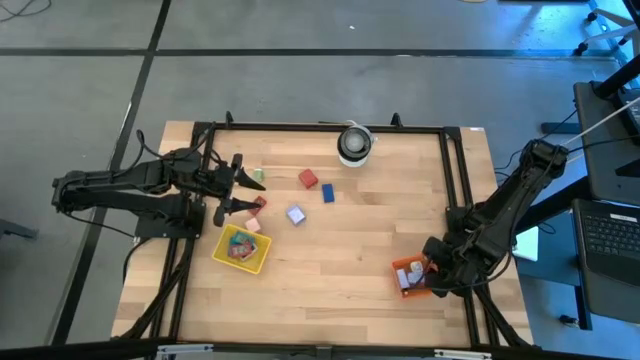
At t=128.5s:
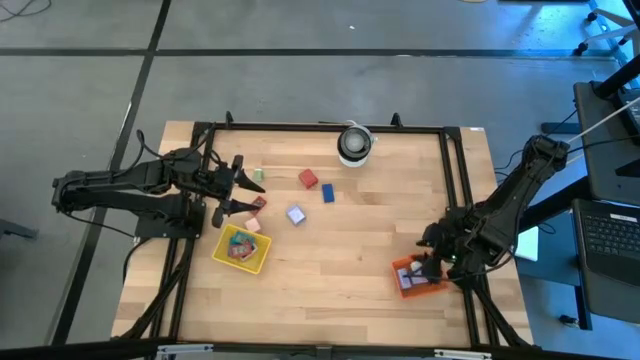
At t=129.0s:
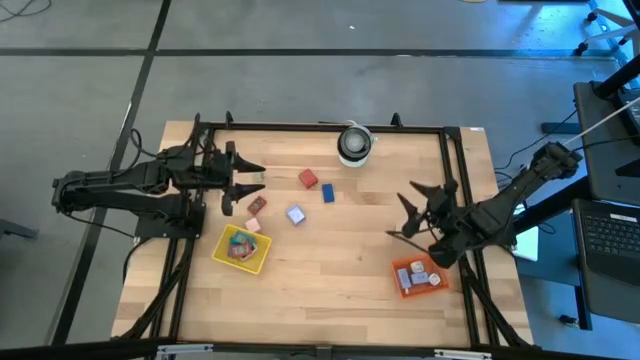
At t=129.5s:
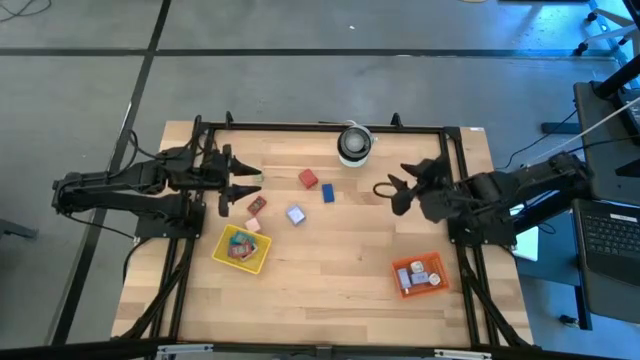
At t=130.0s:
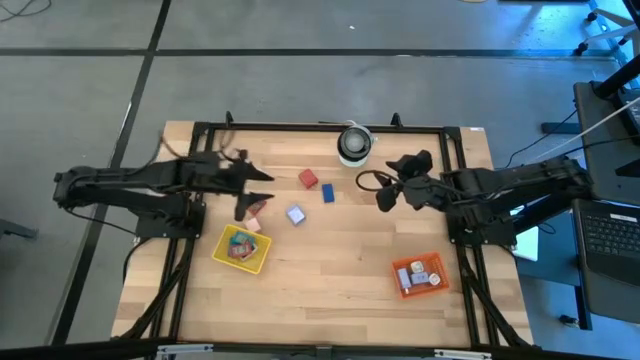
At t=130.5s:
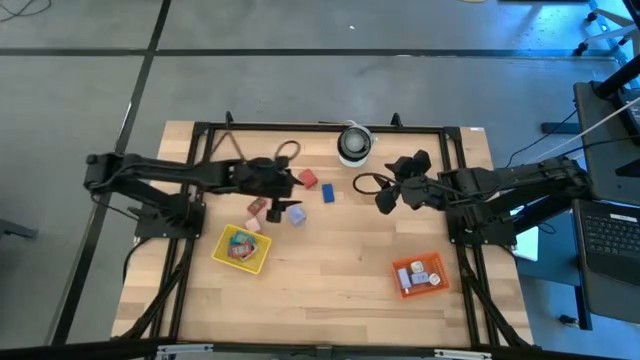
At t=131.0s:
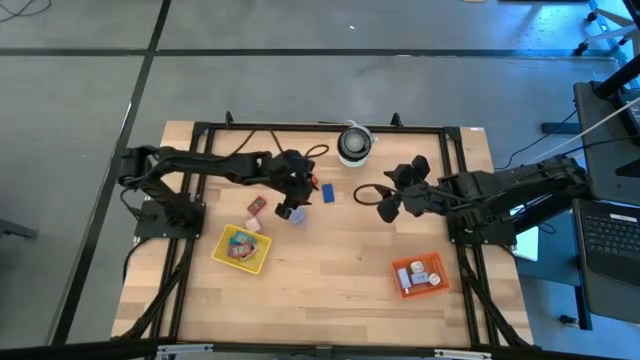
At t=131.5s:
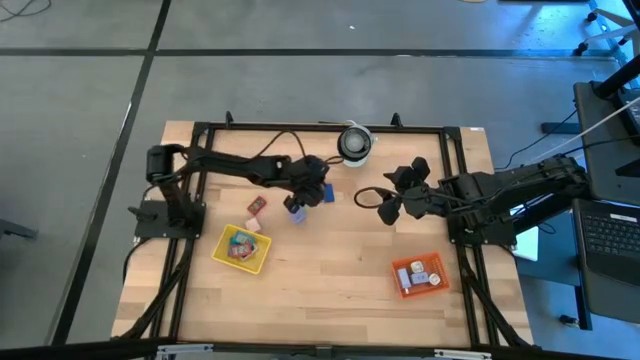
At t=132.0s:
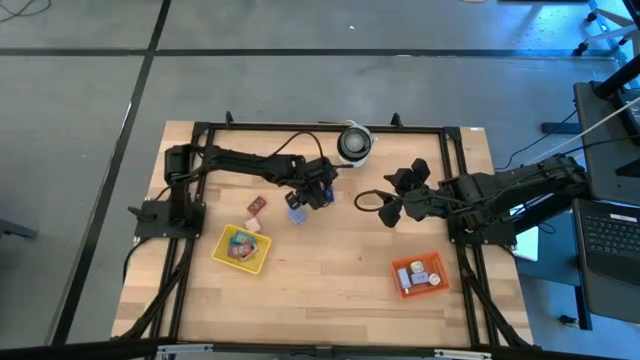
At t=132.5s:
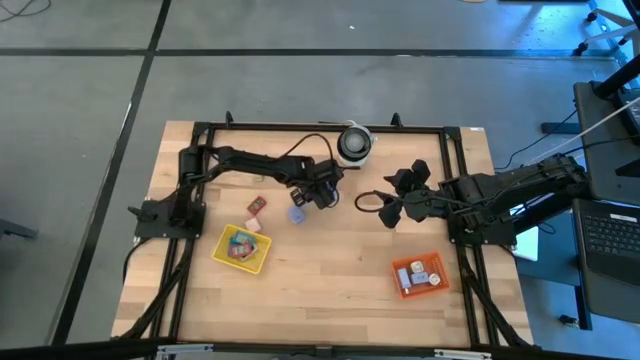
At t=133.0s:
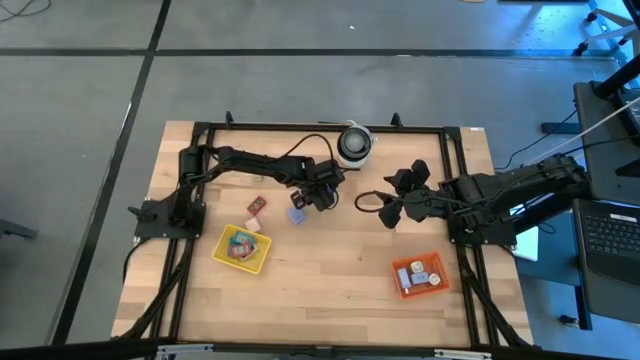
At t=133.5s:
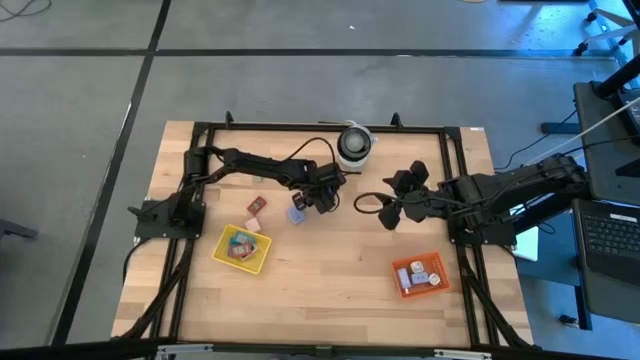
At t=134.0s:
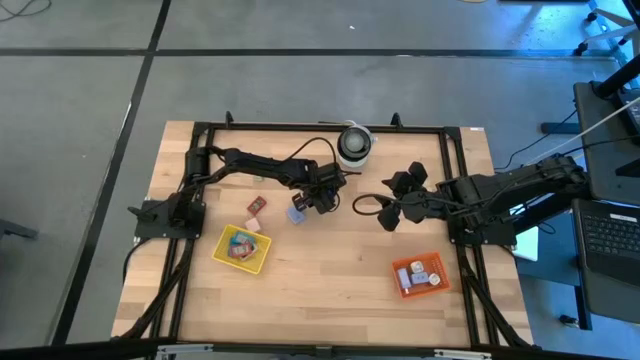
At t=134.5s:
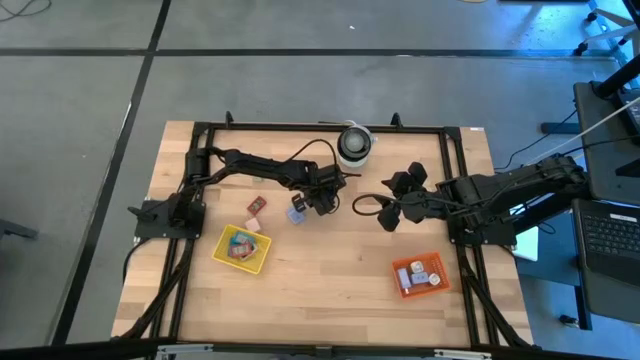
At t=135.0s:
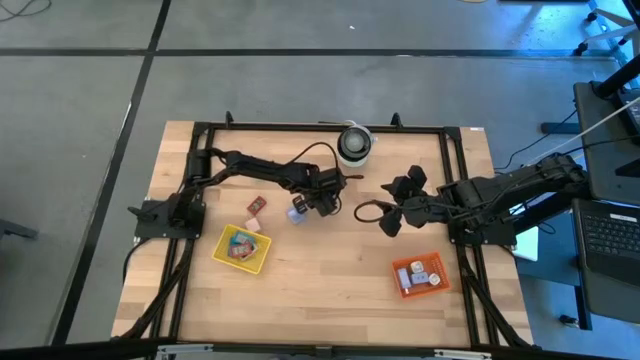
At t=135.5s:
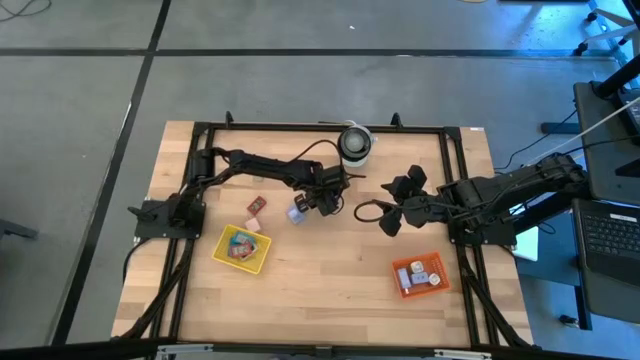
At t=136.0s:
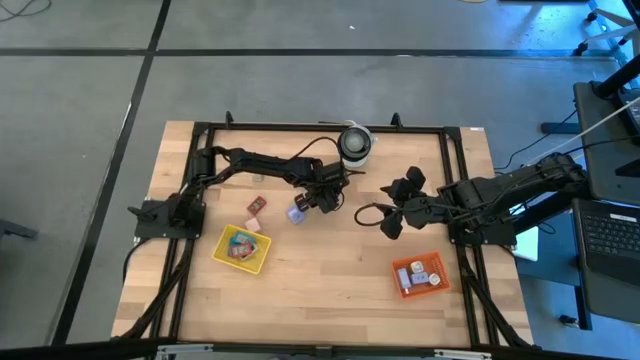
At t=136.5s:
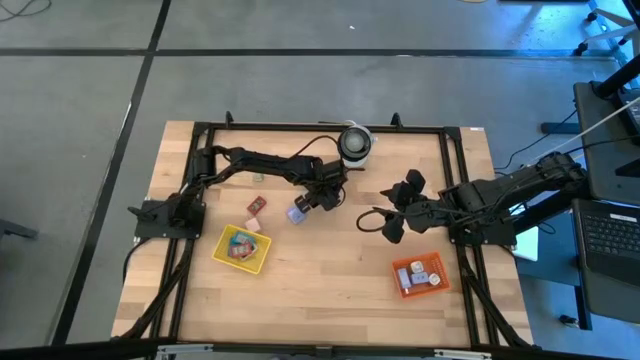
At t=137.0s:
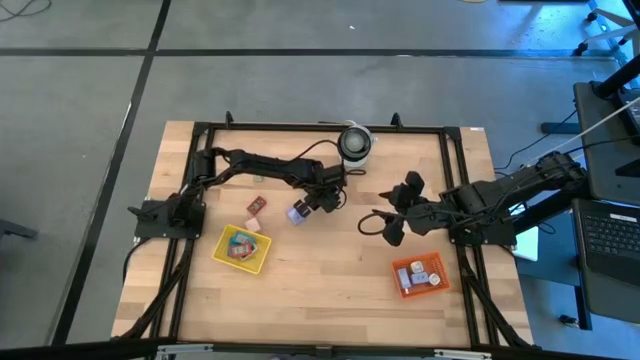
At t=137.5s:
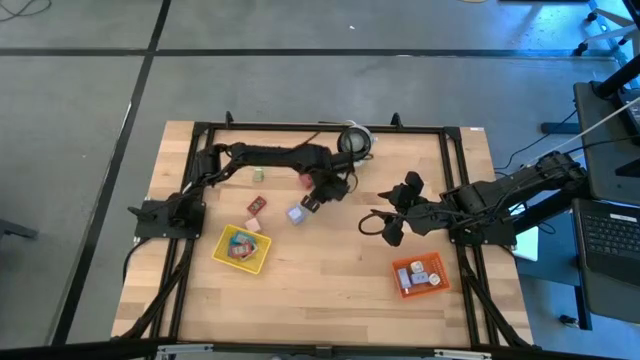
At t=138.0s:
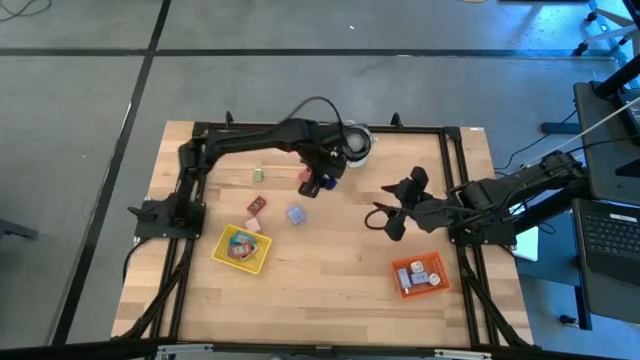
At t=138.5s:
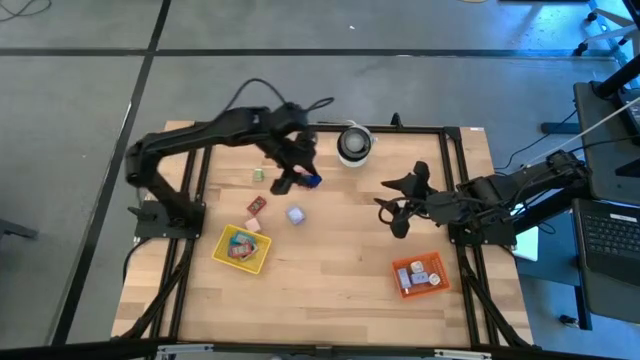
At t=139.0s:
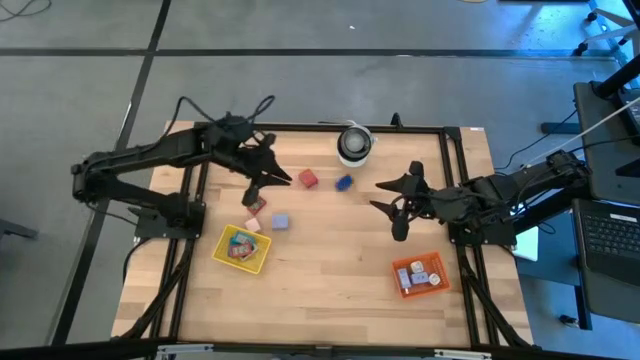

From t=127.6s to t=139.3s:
Task: Pick & Place Office items
Put the blue digital timer into the yellow bin

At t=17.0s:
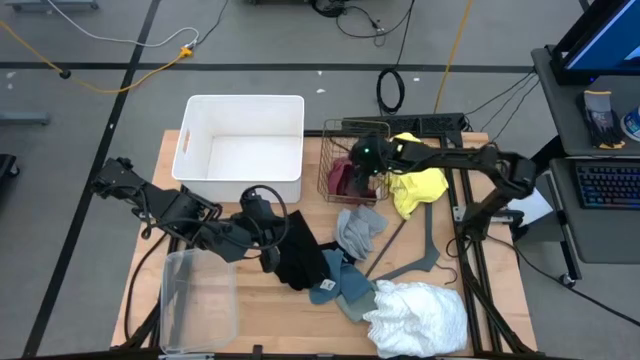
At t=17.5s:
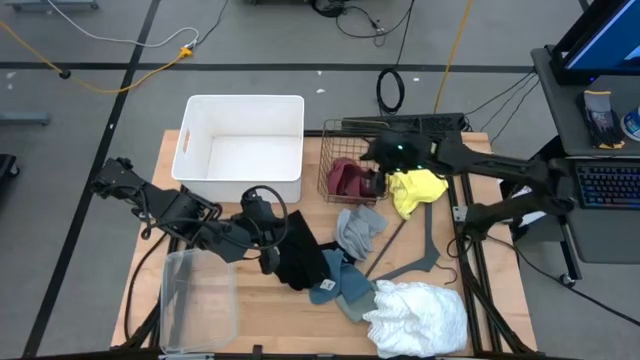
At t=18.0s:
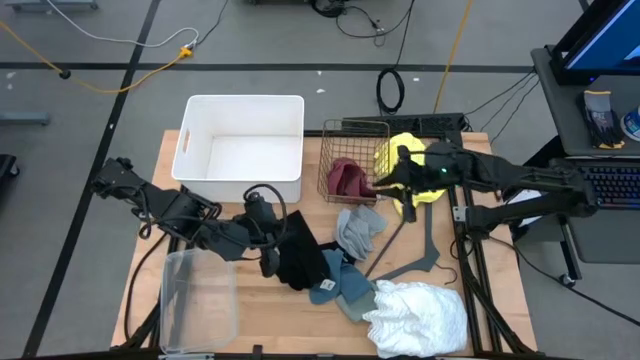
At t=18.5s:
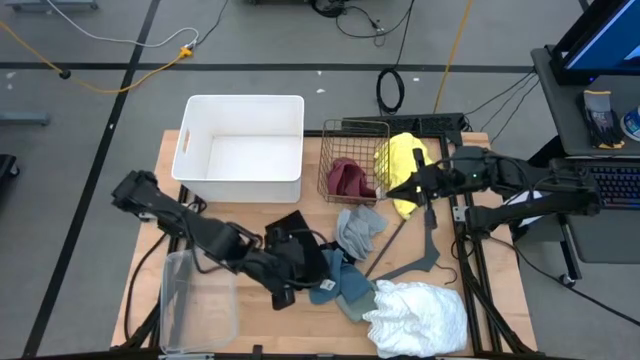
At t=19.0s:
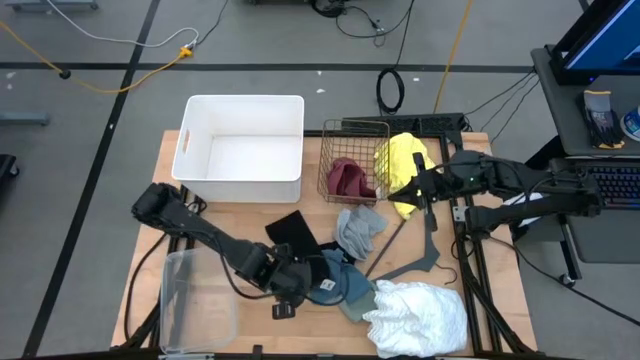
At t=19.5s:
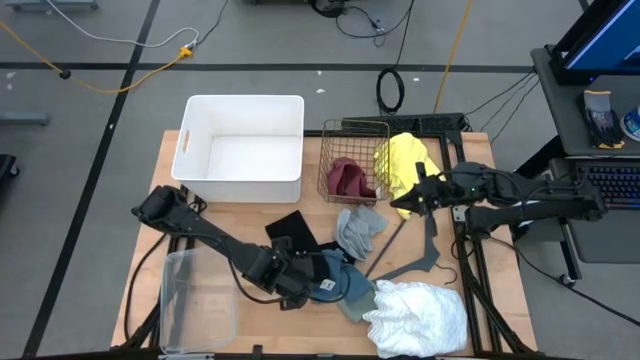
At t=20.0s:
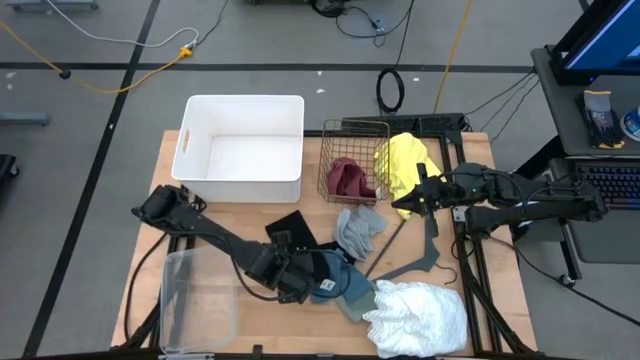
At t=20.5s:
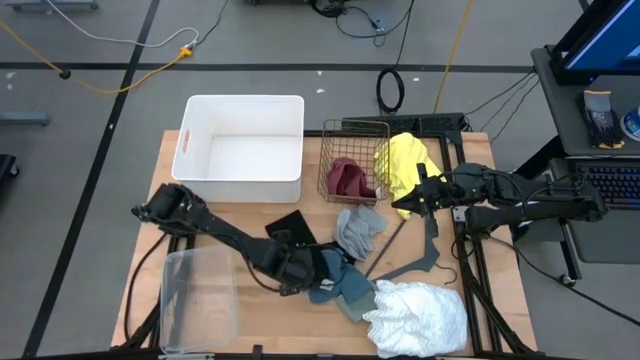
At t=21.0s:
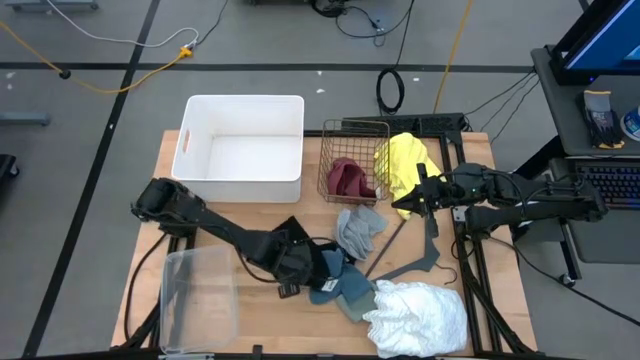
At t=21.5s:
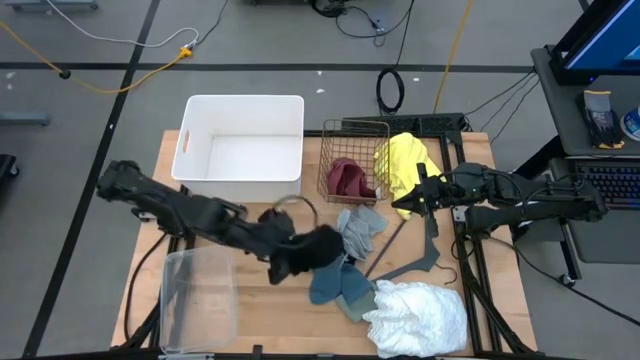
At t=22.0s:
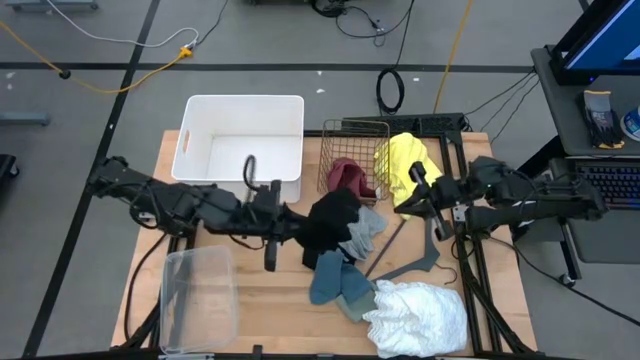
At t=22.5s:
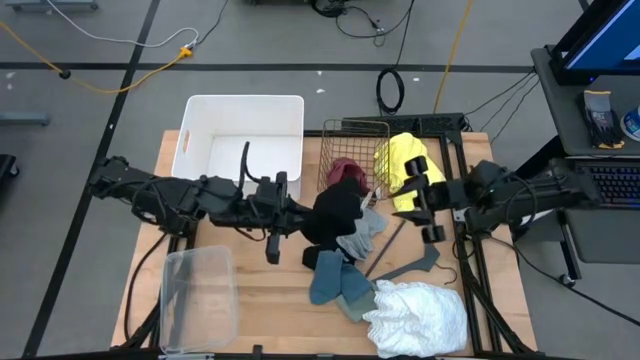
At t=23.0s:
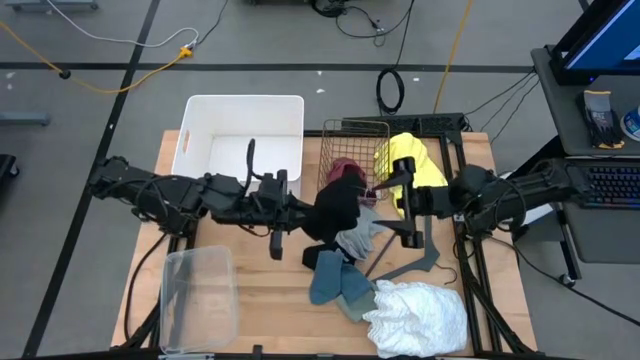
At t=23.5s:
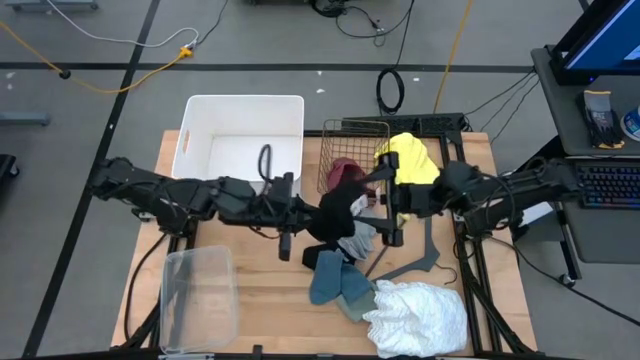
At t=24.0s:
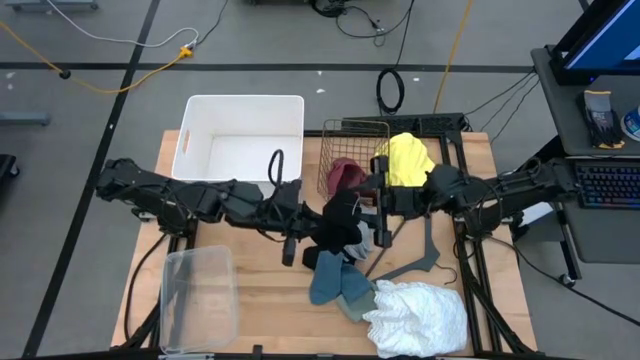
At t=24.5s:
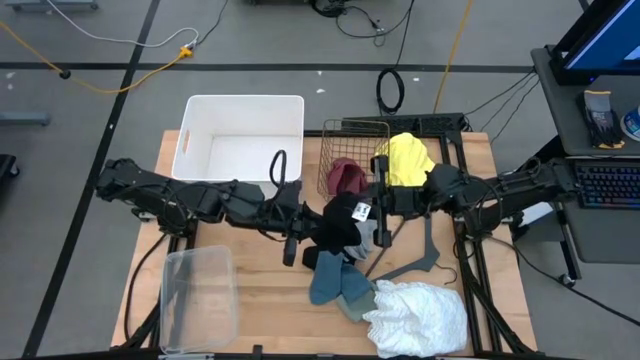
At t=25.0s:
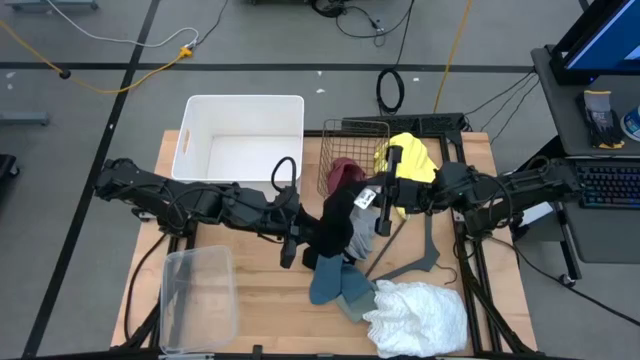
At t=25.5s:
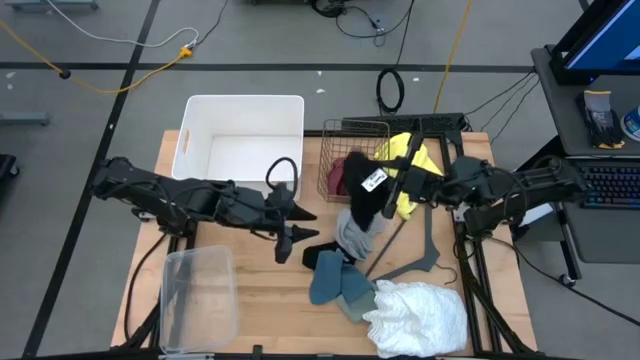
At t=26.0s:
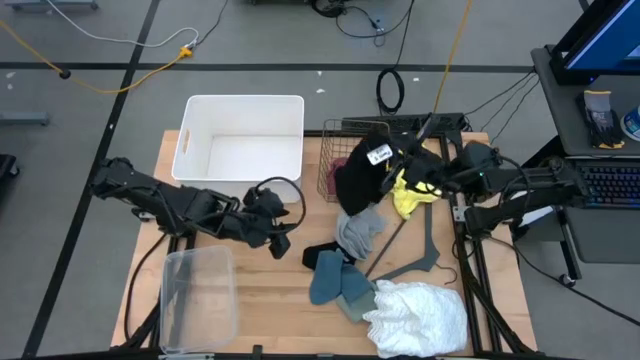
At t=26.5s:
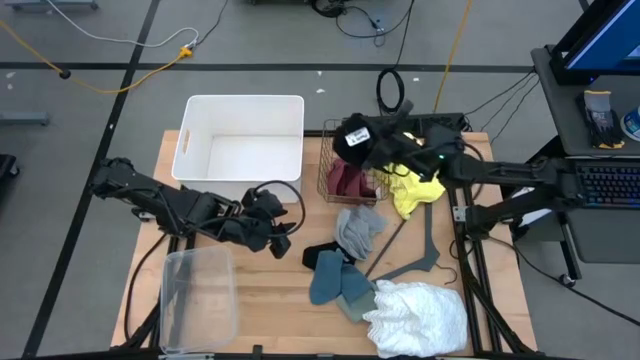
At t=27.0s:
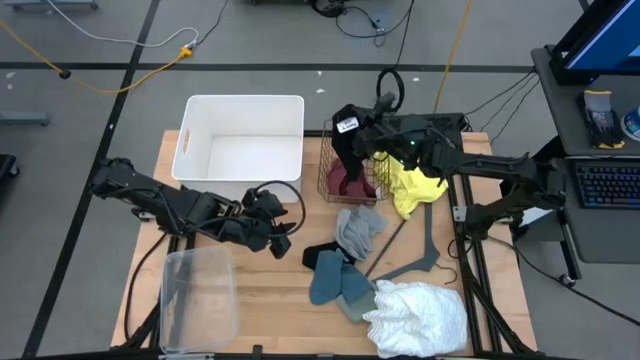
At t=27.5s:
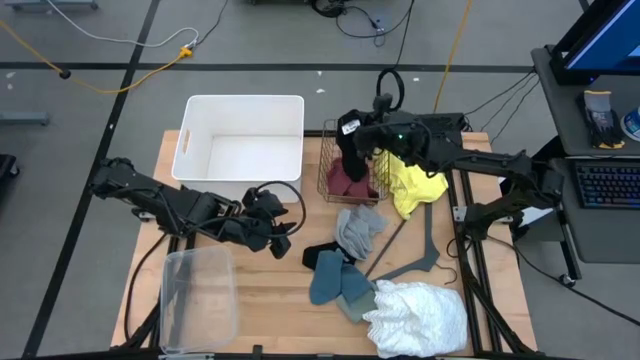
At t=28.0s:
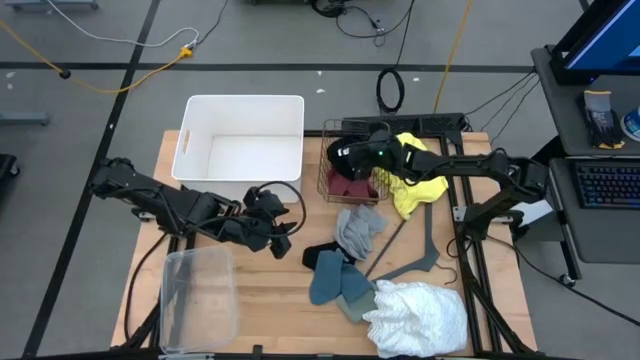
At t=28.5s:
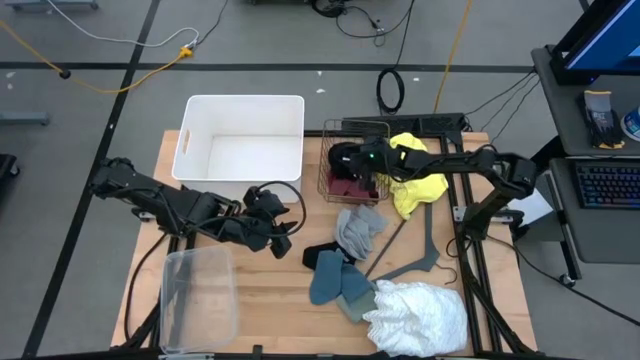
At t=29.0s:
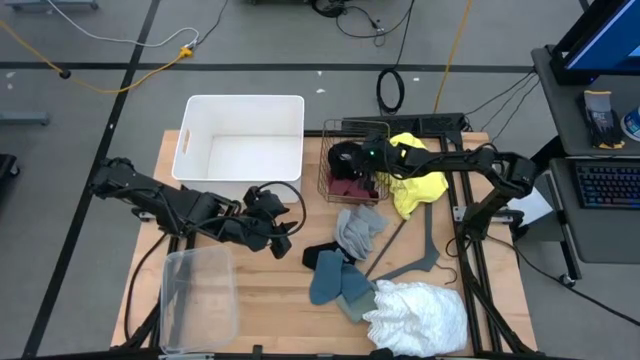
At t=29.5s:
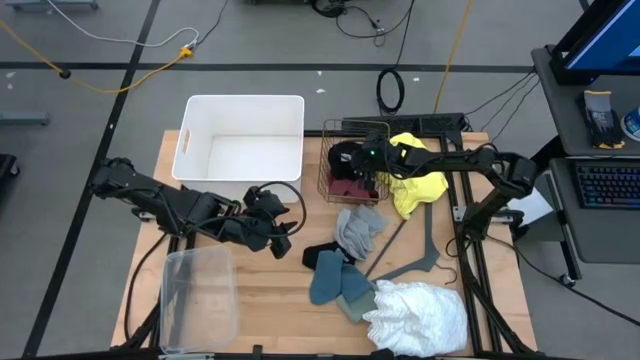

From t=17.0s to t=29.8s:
Task: Pick & Place Cloths
Put the black boxers into the gold wire basket
